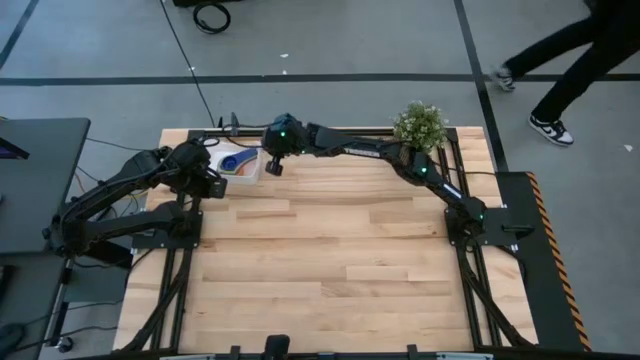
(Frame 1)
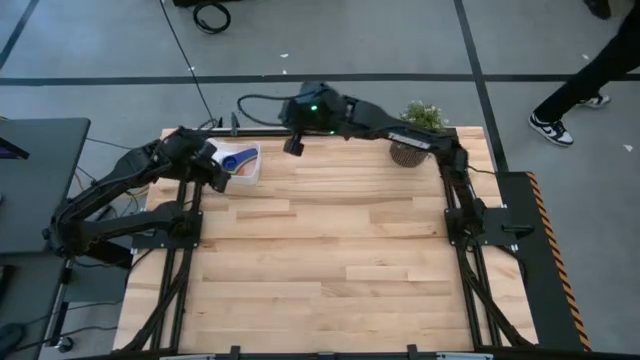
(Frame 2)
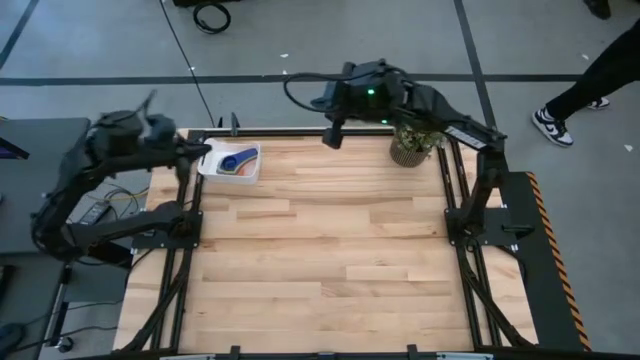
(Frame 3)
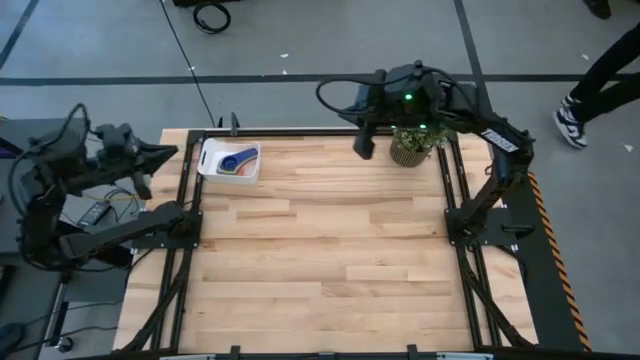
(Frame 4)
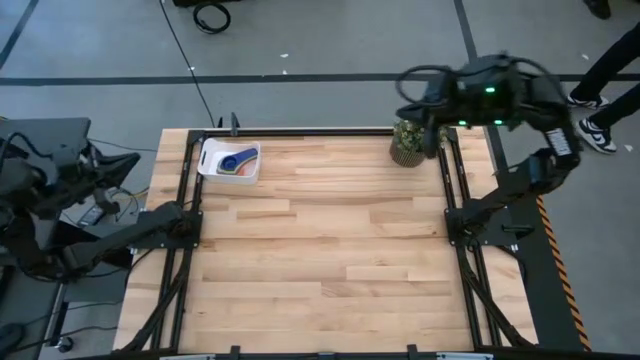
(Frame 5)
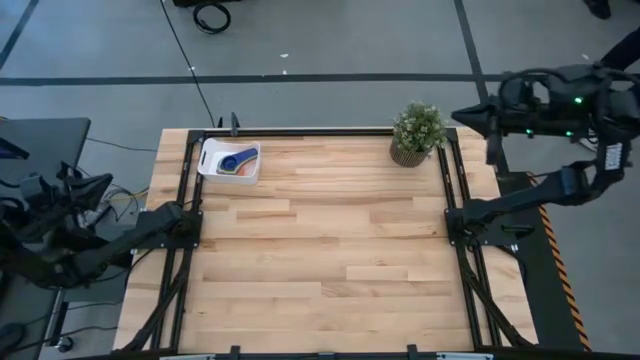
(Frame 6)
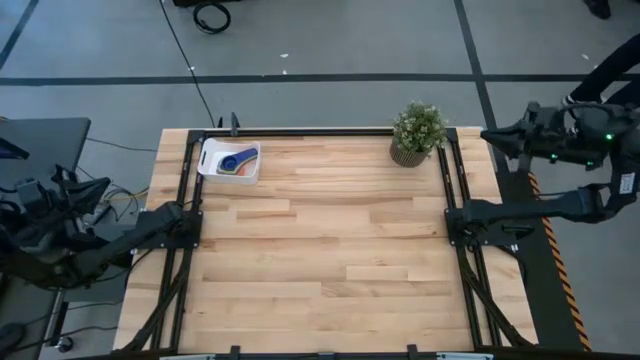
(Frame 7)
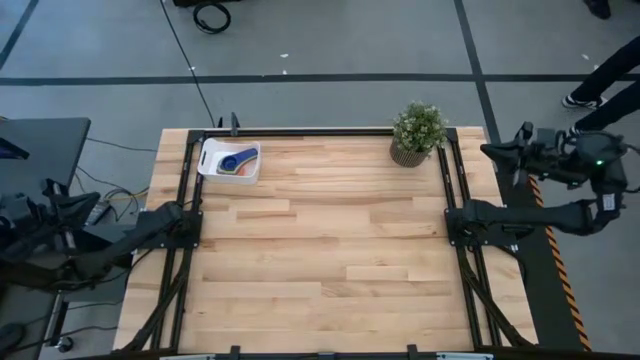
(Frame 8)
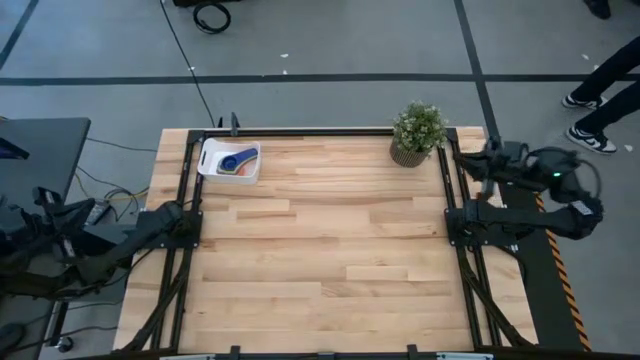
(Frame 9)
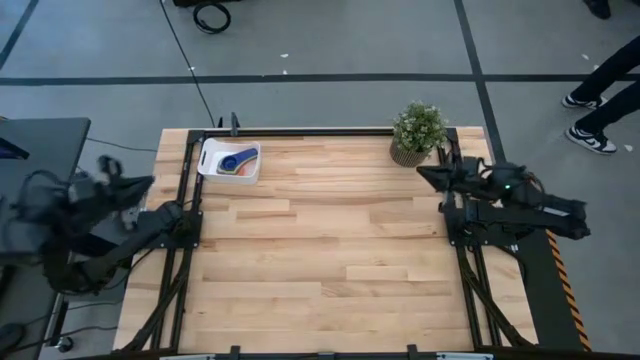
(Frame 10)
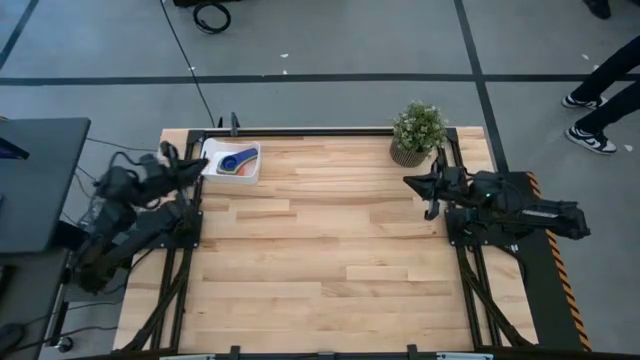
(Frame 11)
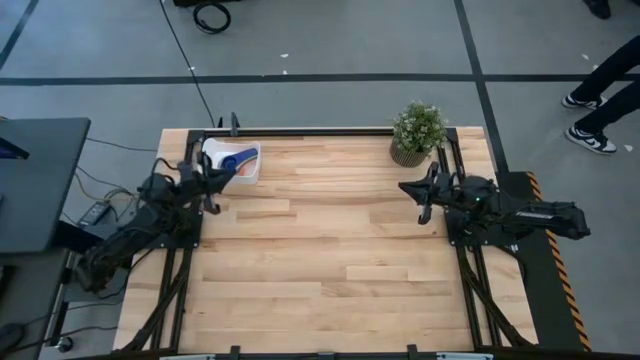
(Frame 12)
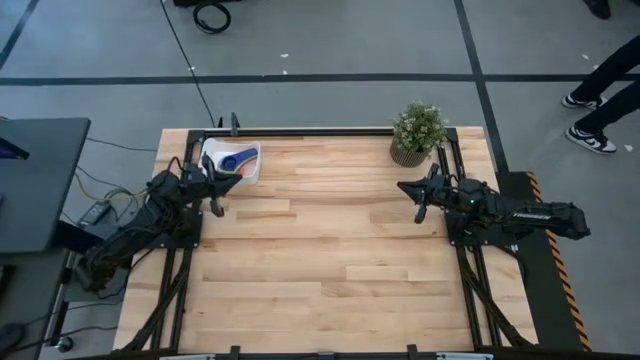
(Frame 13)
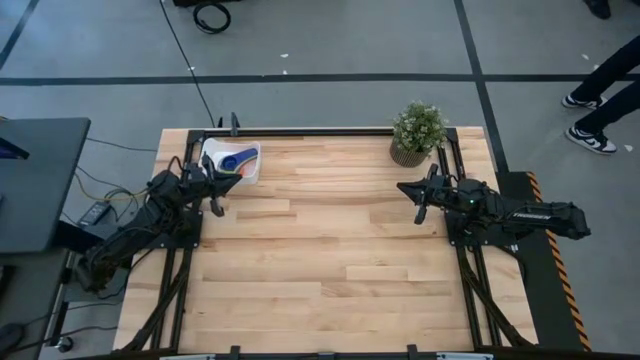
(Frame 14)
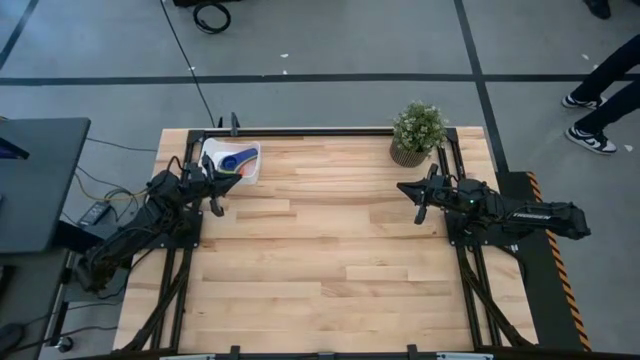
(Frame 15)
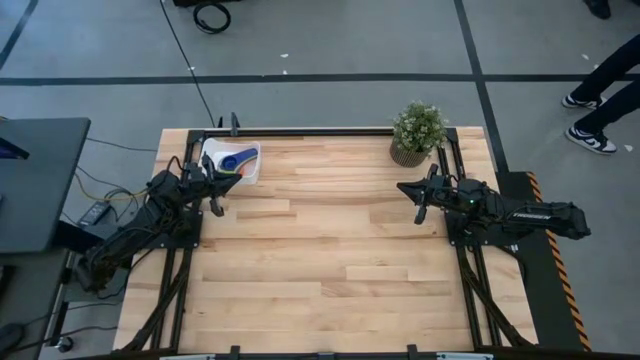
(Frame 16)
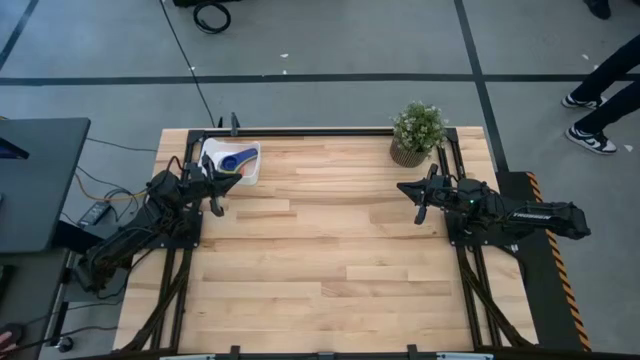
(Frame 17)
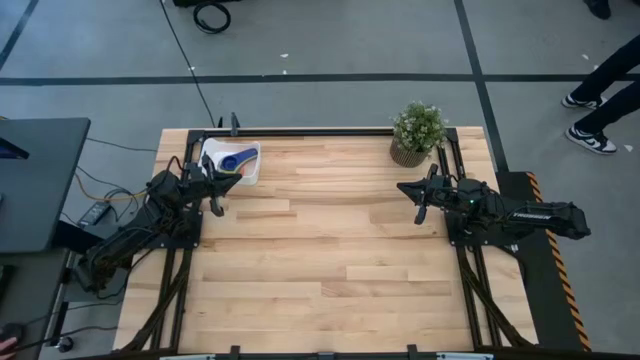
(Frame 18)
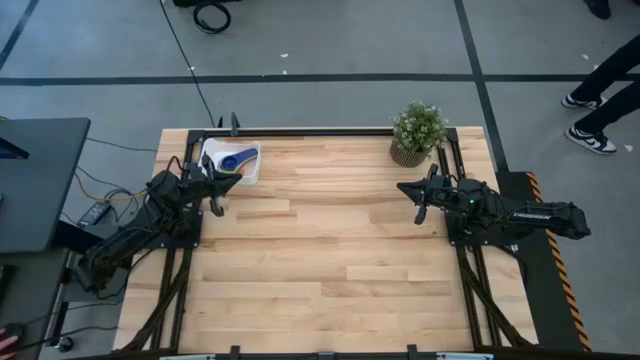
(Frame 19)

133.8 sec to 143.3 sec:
Task: Nest measuring cups in basket
Return to Home Position

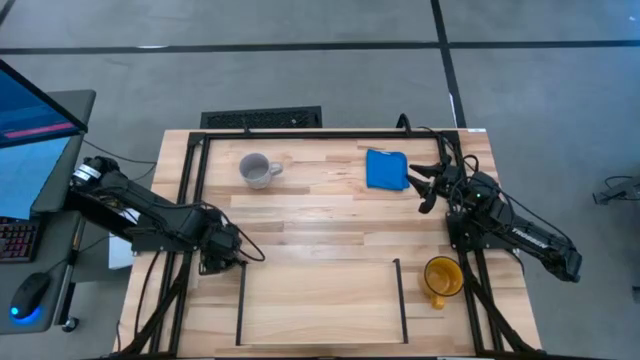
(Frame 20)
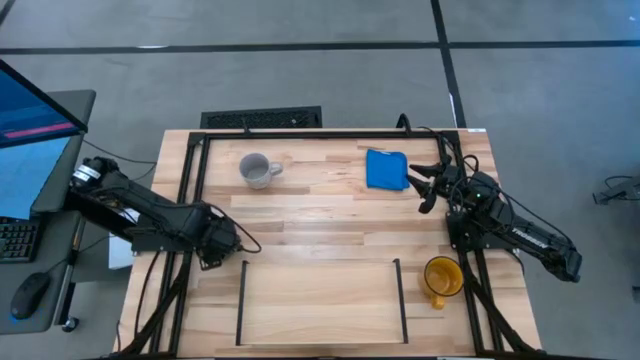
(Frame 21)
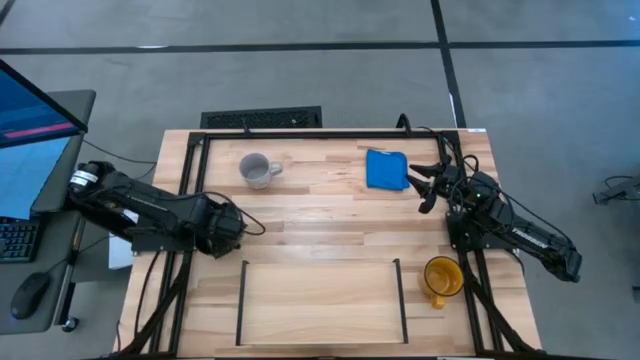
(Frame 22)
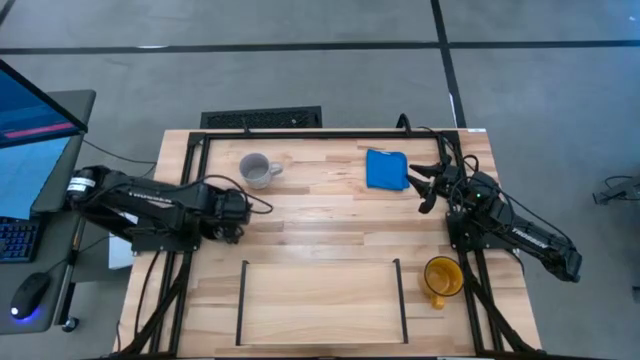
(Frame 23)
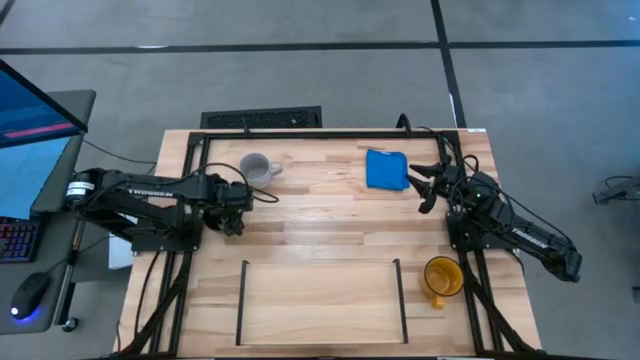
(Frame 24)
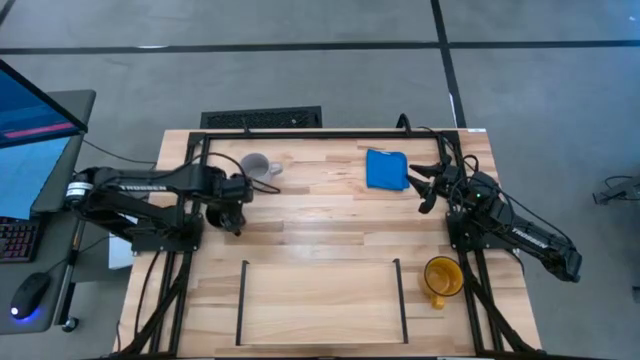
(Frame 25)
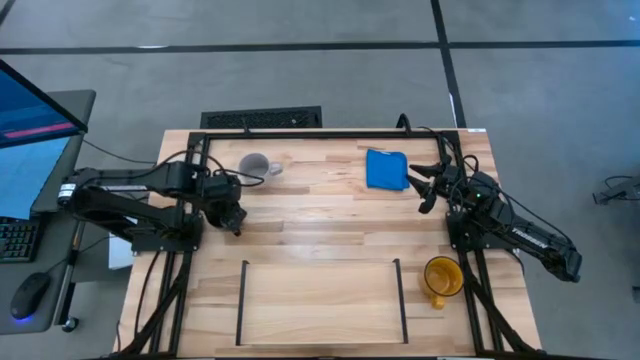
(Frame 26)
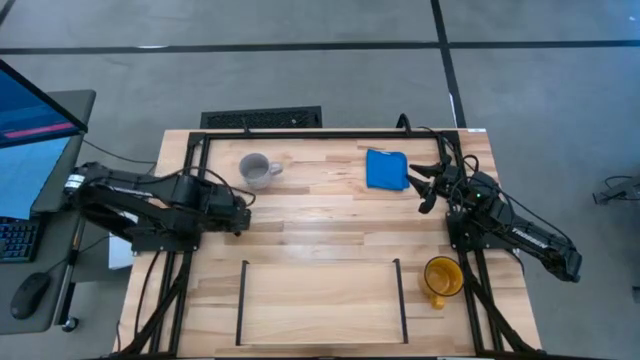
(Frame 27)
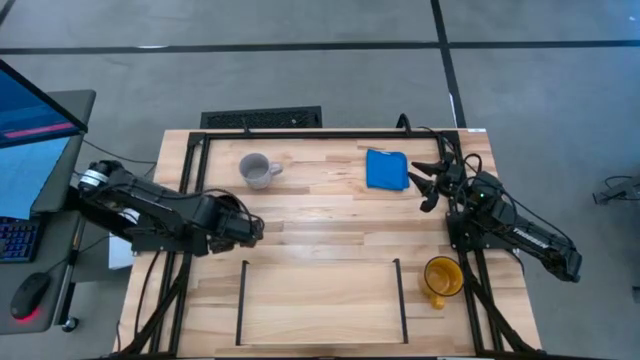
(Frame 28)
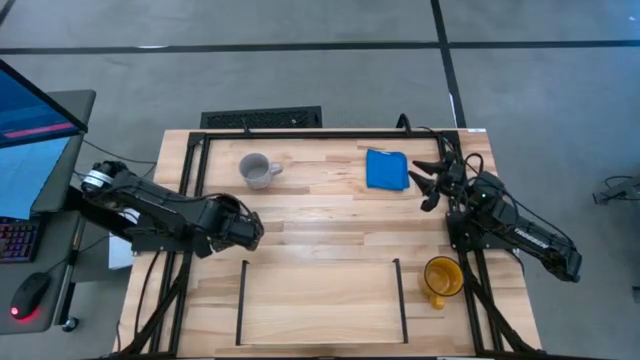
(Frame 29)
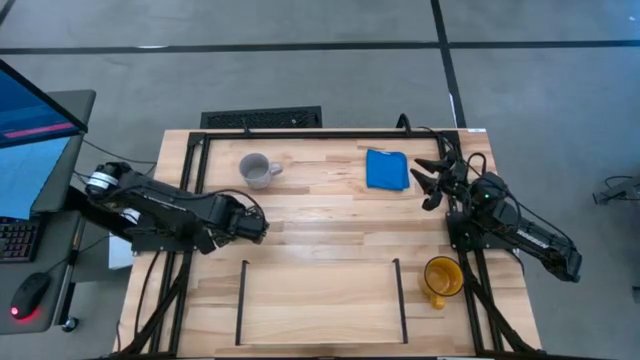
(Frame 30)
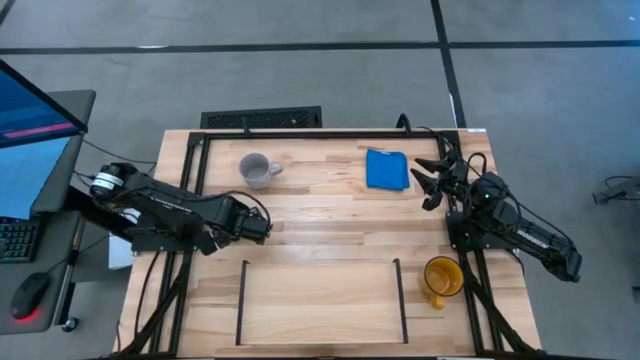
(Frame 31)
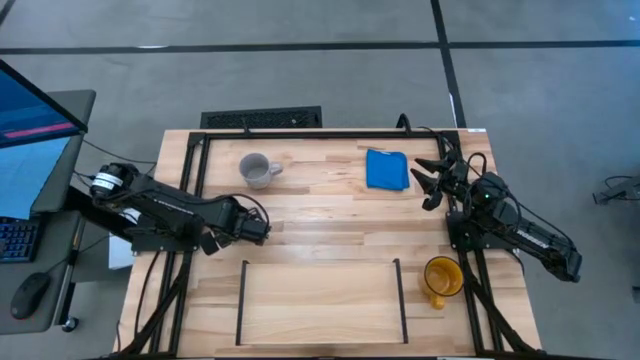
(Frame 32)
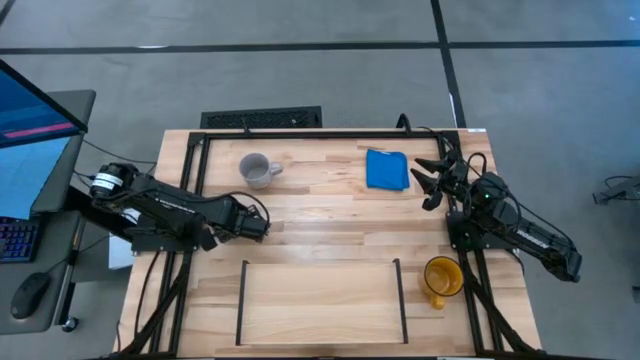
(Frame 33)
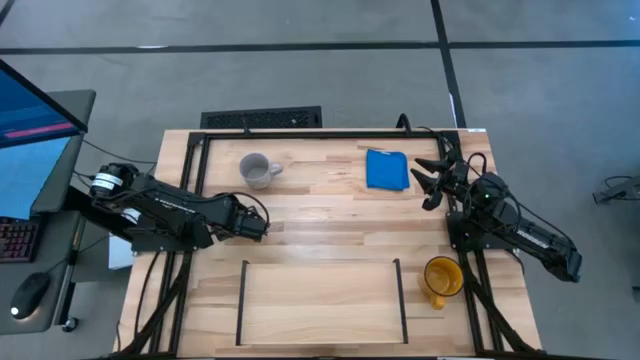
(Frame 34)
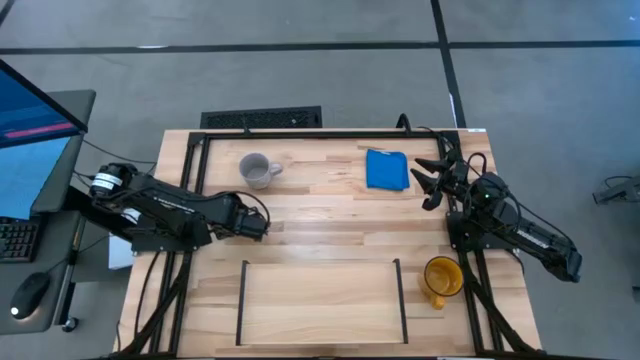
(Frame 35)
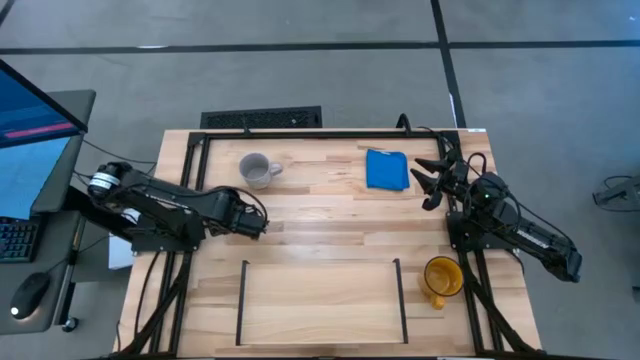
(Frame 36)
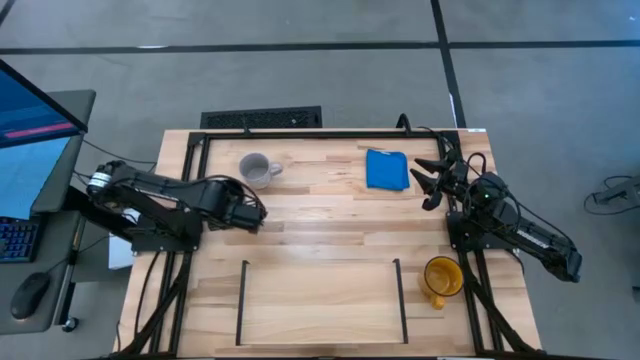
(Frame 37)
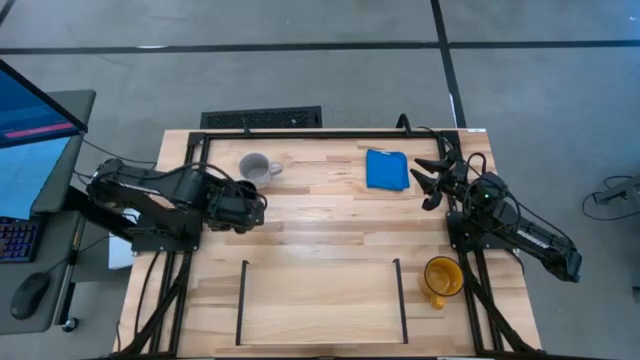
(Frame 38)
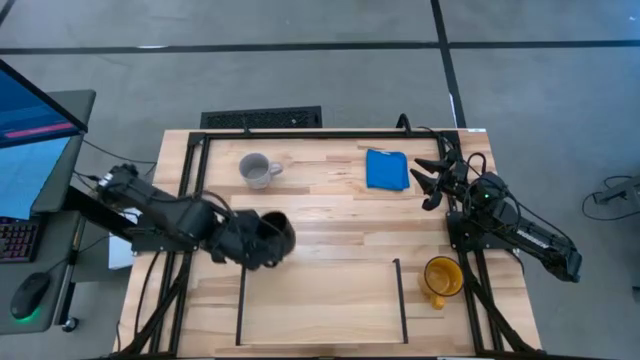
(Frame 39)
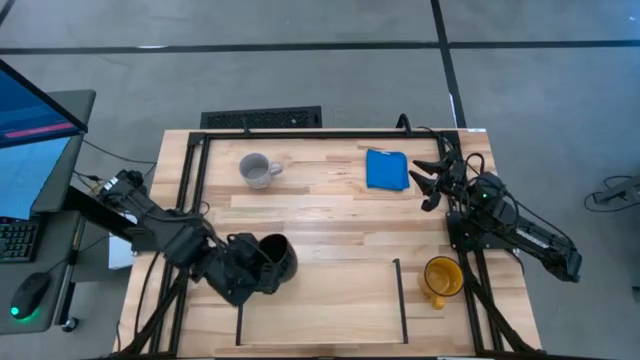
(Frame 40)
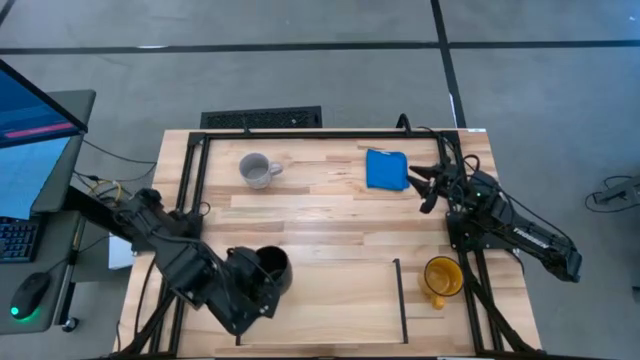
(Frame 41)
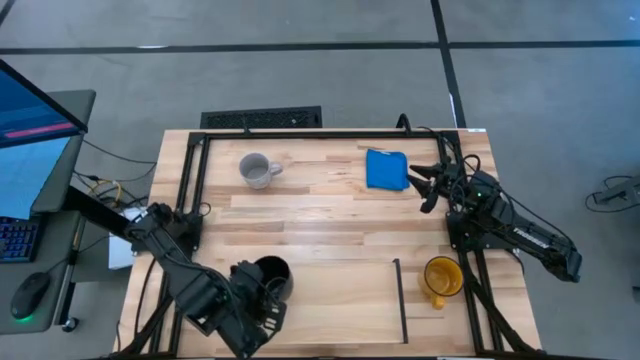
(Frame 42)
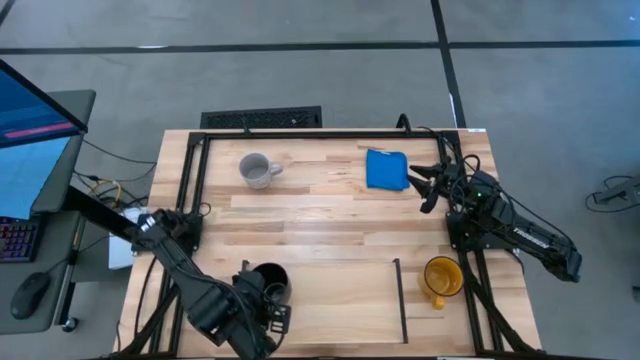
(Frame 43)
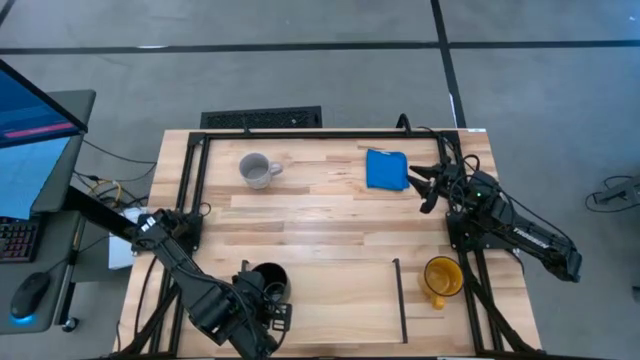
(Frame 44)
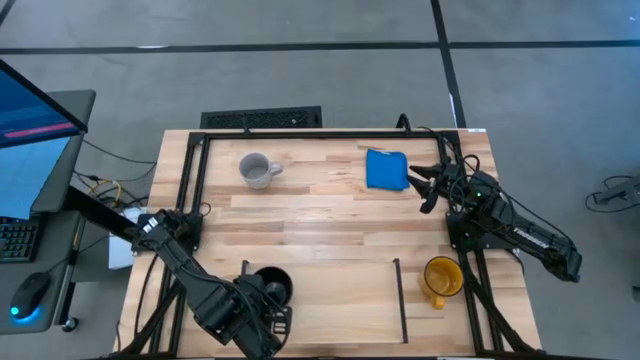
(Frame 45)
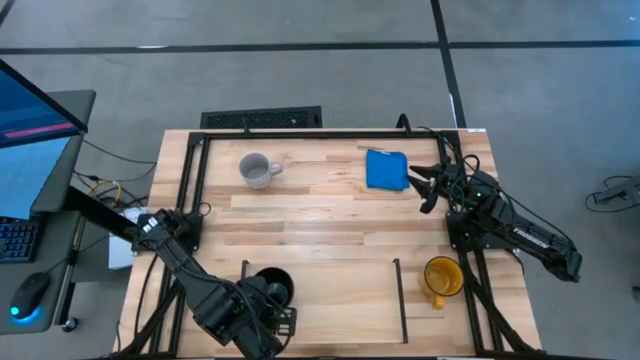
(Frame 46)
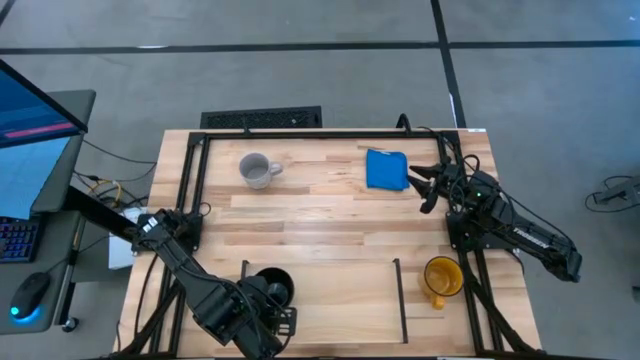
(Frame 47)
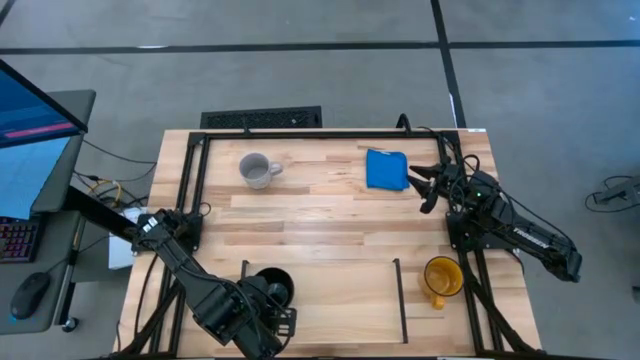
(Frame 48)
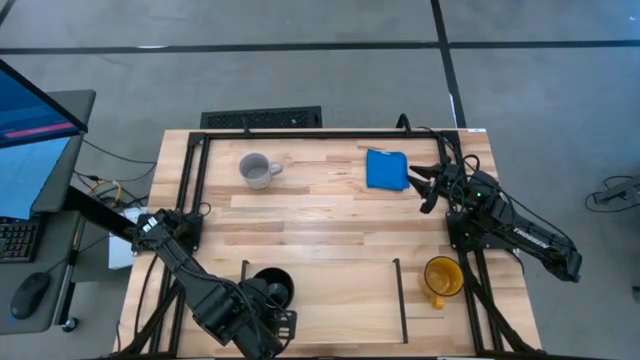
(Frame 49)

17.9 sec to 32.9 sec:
Task: Stack small to large cups/mugs on shelf
Put the black mug on the shelf
